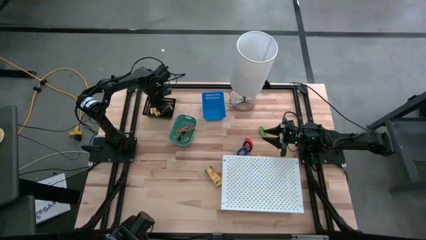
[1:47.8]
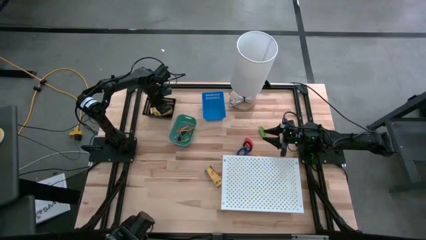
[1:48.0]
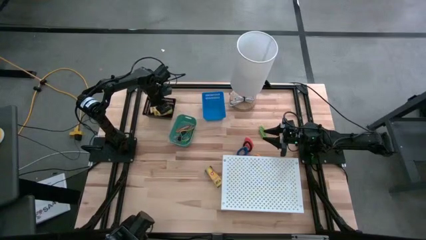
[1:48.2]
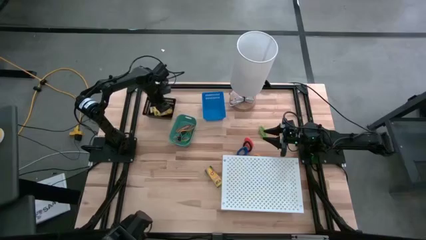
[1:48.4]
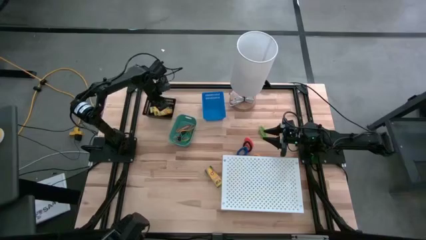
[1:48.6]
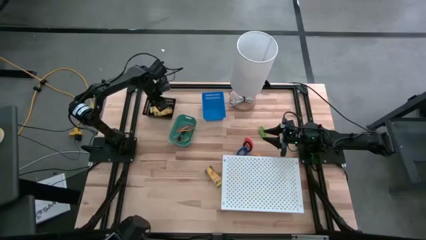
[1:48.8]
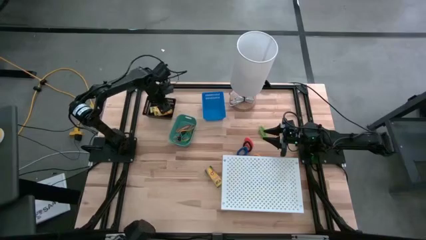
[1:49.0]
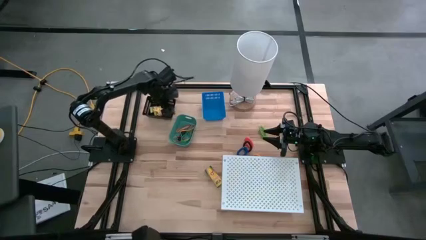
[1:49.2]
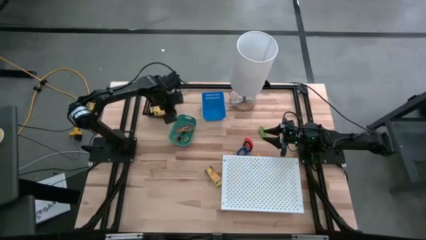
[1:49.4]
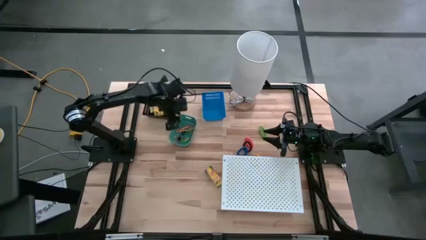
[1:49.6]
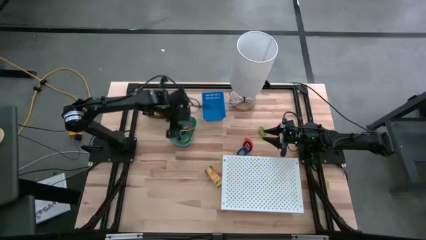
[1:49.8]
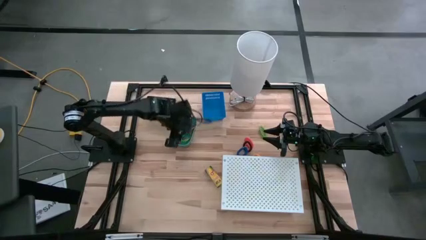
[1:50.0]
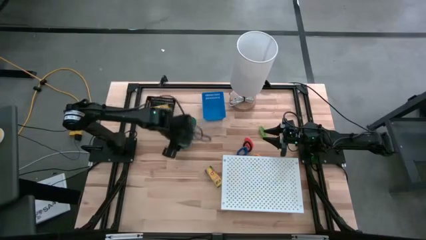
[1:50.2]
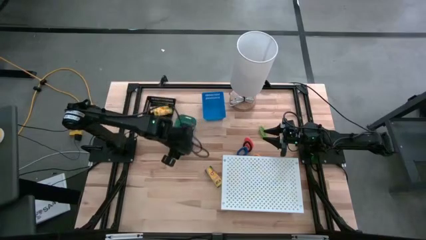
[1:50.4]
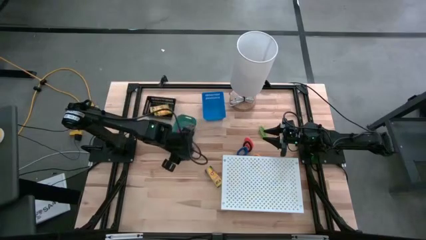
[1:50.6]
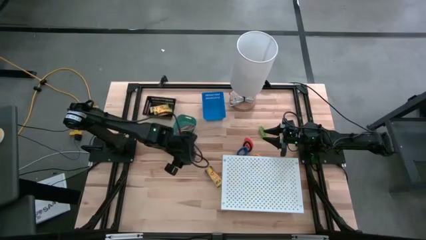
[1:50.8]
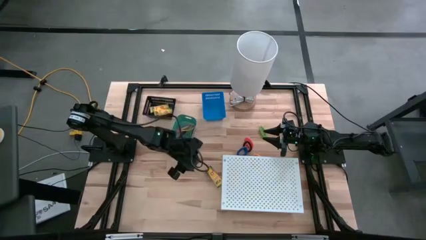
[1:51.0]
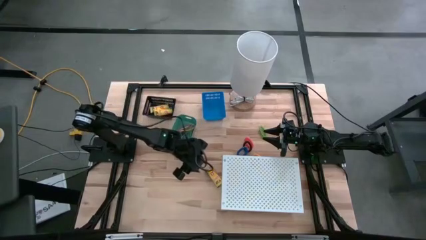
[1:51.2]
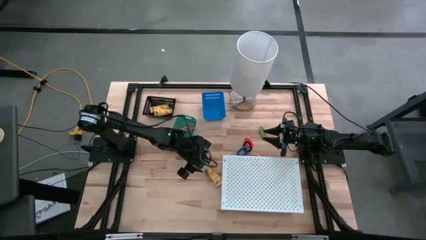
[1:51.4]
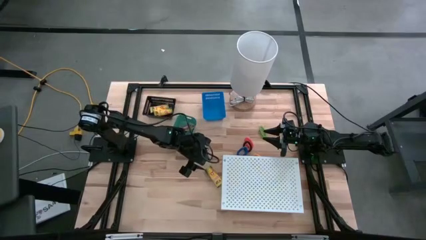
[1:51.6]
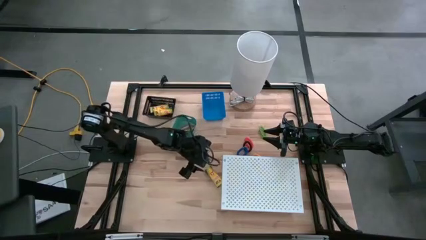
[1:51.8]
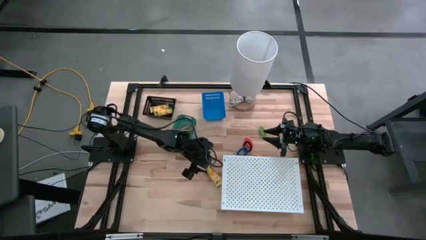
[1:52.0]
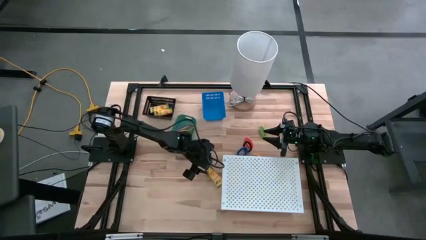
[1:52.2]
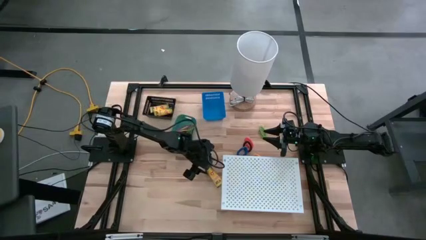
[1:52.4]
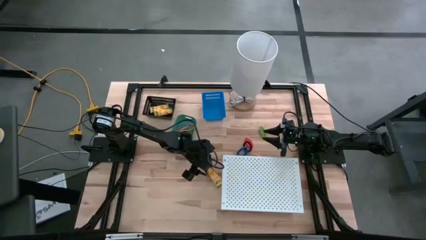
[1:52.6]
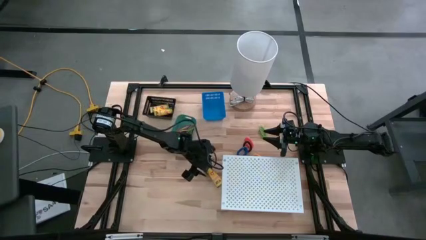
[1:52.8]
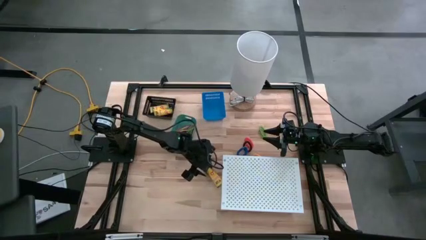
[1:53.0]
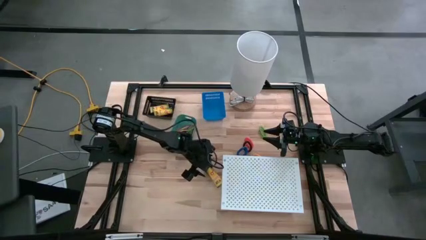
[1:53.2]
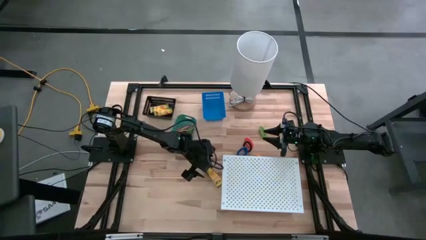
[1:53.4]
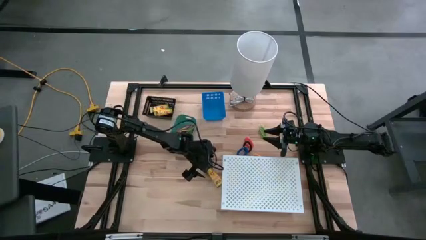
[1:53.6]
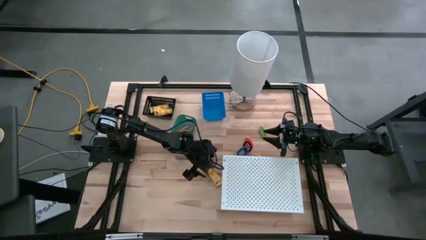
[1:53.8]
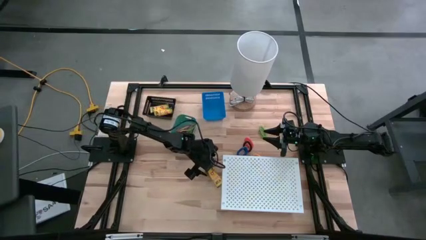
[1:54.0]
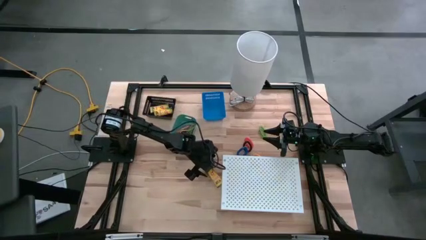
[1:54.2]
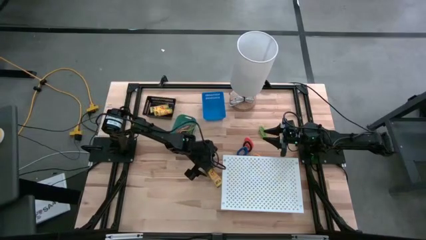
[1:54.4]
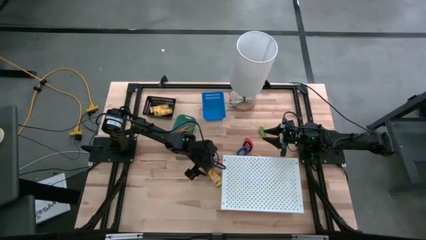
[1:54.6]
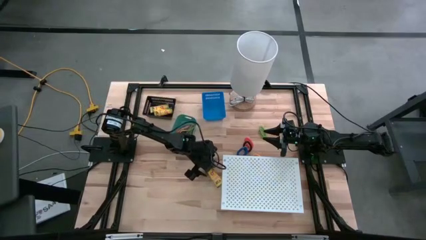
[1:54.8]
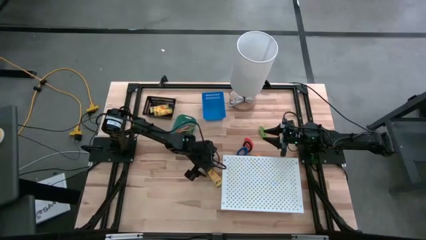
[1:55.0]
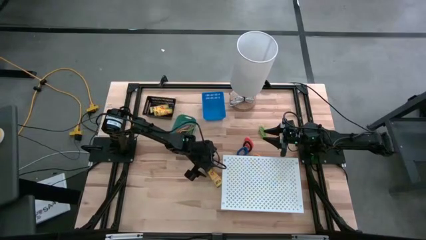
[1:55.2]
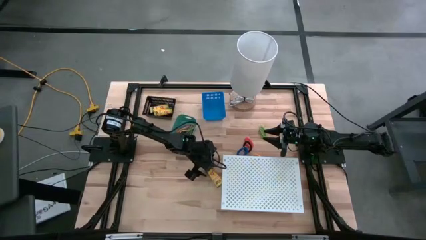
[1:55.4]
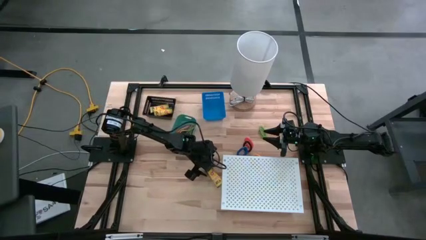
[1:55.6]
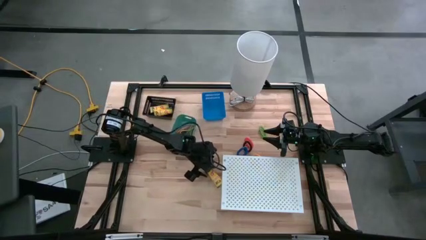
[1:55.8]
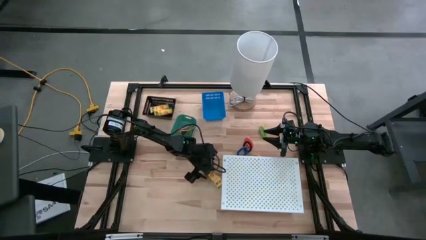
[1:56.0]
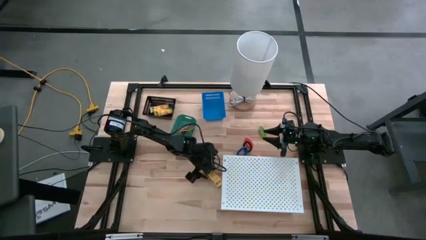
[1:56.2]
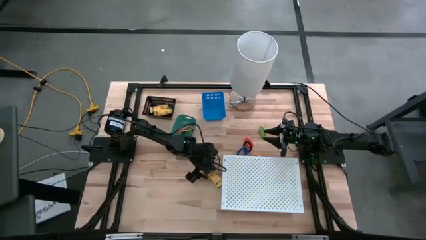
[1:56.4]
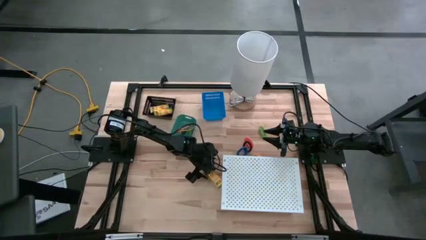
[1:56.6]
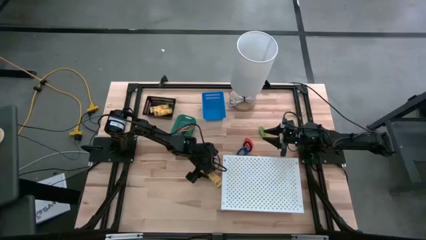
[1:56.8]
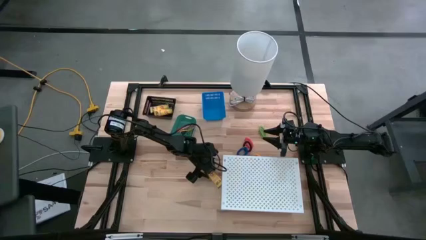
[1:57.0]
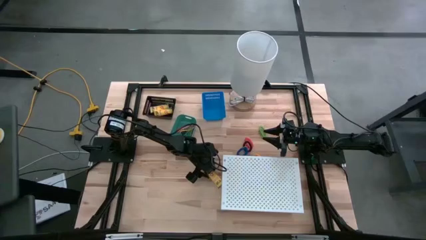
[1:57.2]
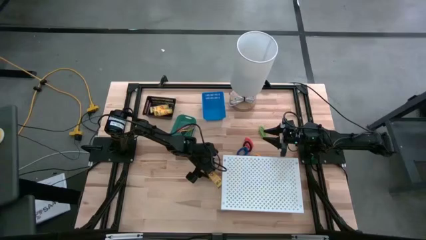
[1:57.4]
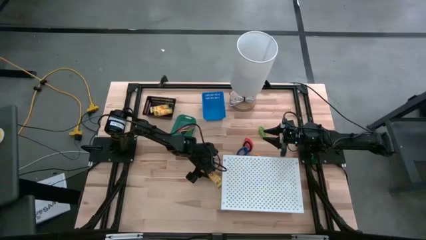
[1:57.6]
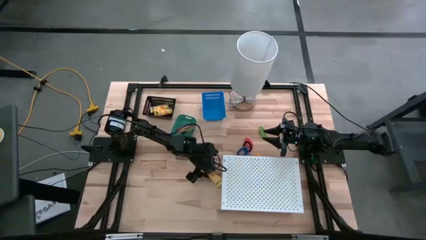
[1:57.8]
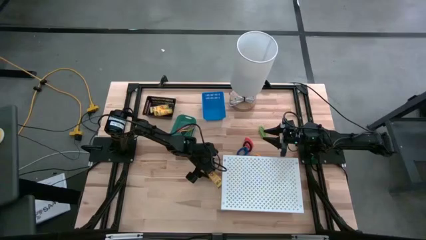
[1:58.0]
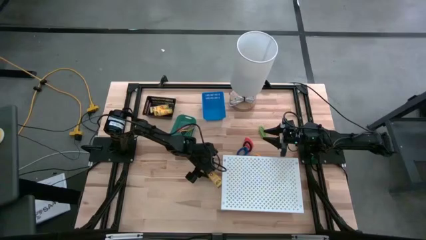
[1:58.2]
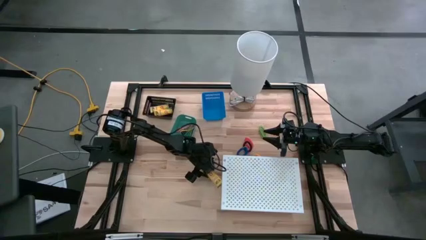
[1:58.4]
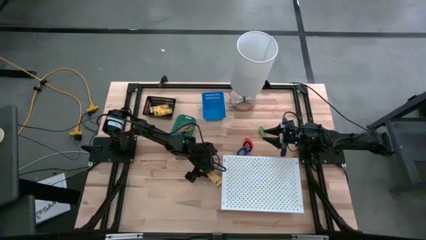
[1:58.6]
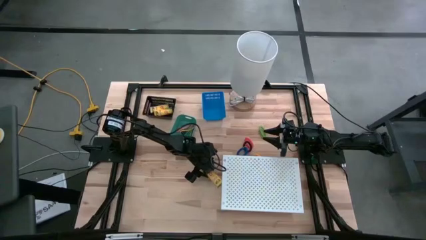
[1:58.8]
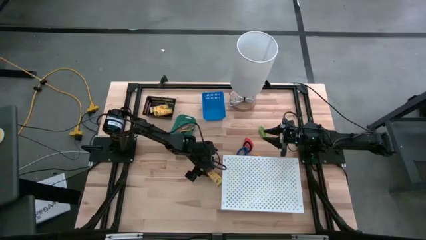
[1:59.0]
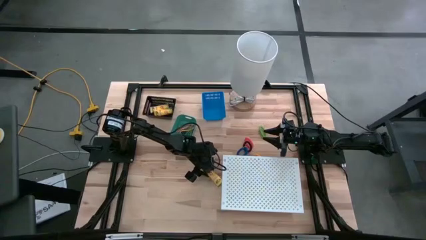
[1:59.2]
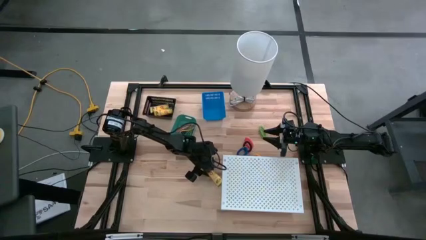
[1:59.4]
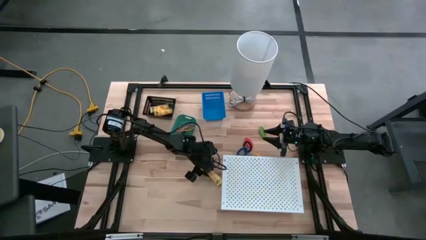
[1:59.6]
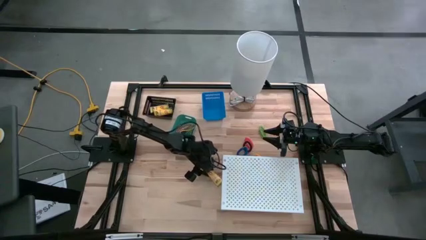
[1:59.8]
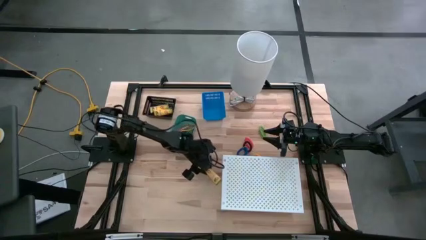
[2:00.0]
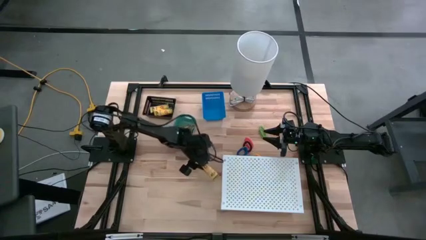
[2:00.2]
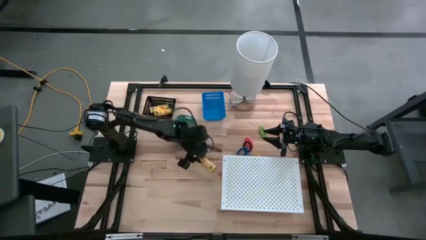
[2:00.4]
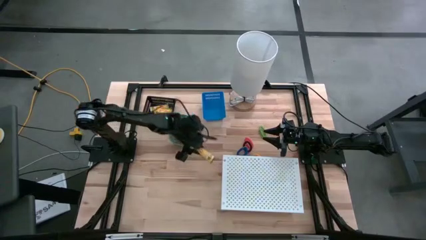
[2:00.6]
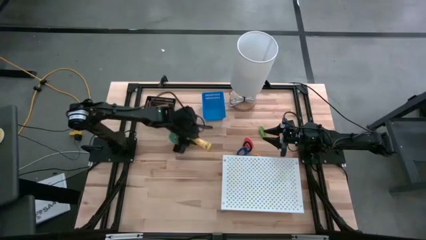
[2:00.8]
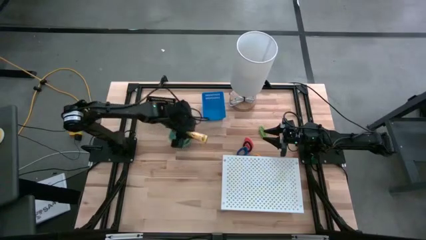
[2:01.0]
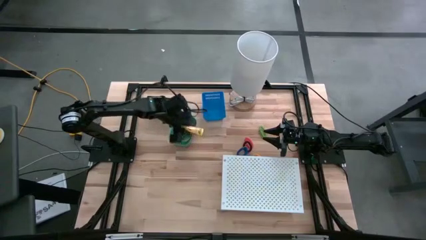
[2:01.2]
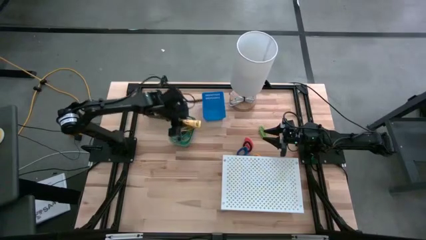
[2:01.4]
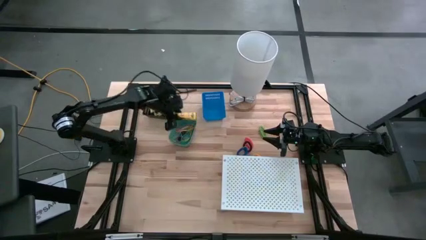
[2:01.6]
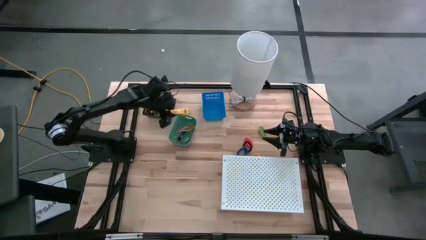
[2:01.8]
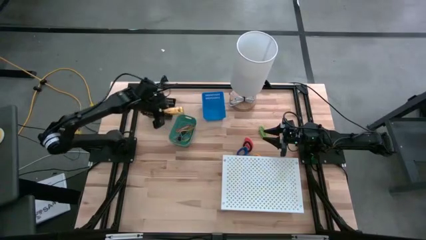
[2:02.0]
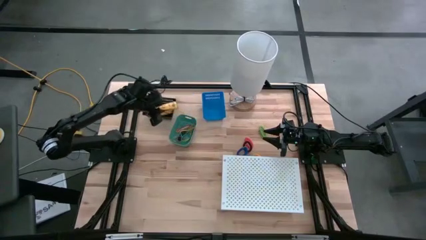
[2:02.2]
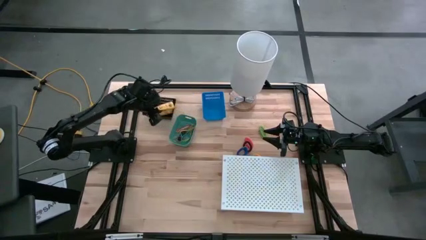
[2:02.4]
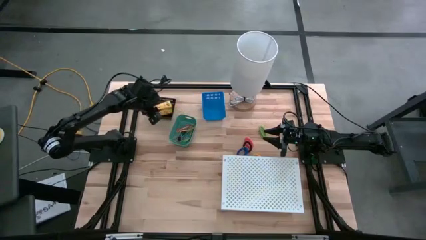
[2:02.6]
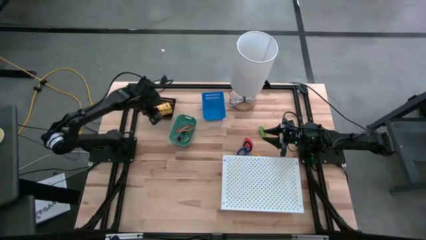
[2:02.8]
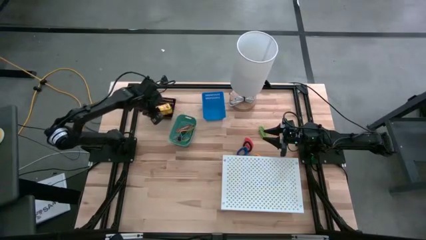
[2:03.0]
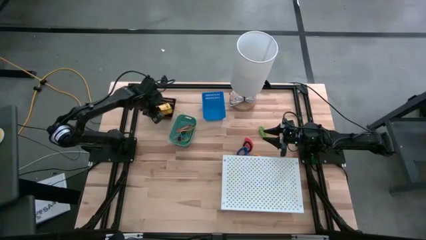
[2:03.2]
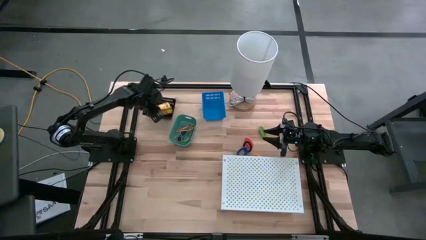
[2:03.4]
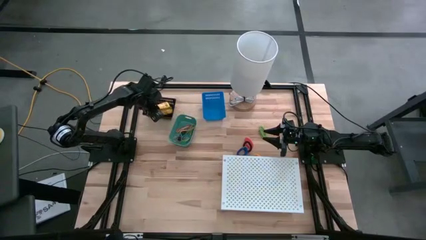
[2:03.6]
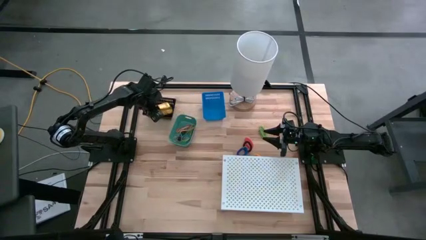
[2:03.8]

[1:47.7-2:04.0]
Task: Pick & Place Office Desk Supplies
Put the yellow crayon box into the black bin
